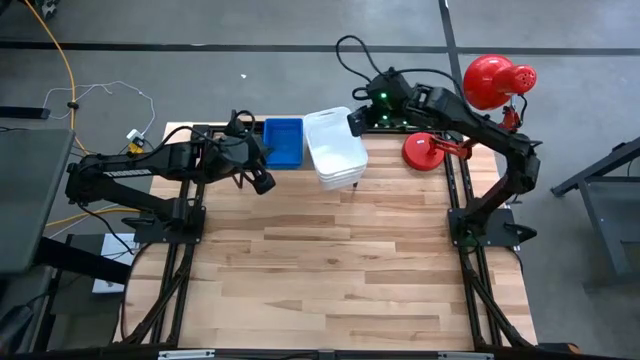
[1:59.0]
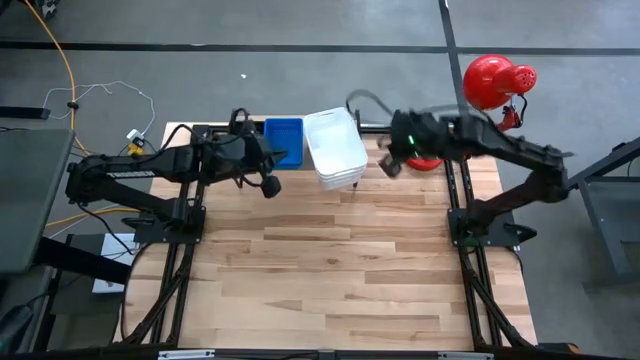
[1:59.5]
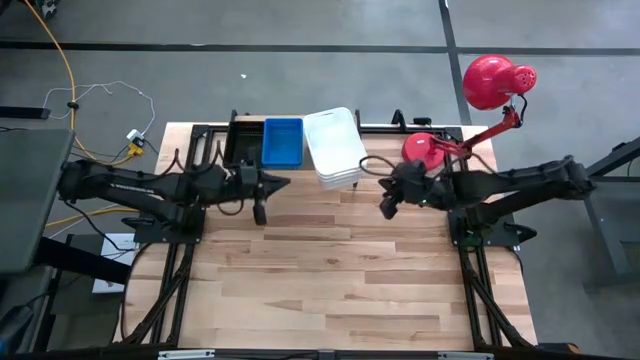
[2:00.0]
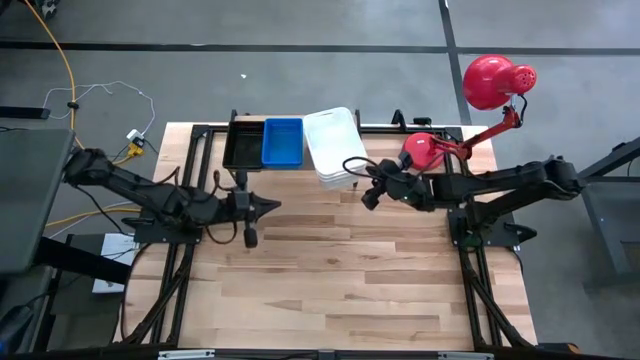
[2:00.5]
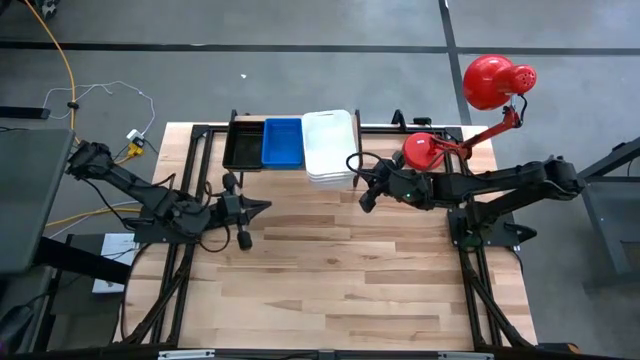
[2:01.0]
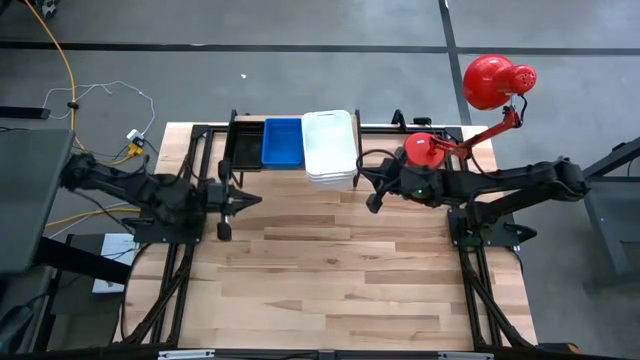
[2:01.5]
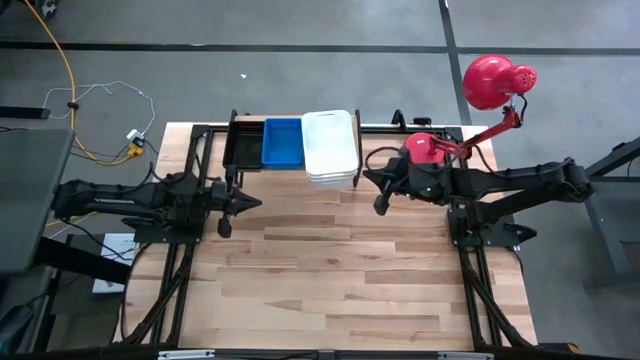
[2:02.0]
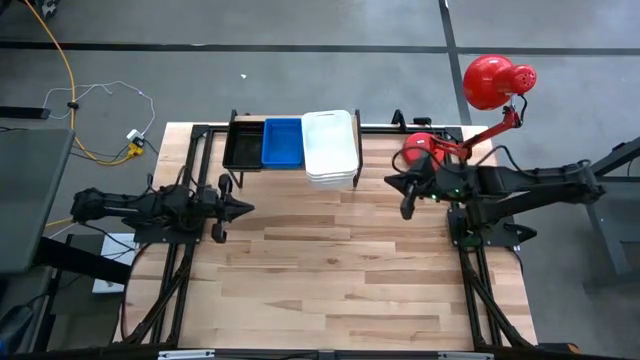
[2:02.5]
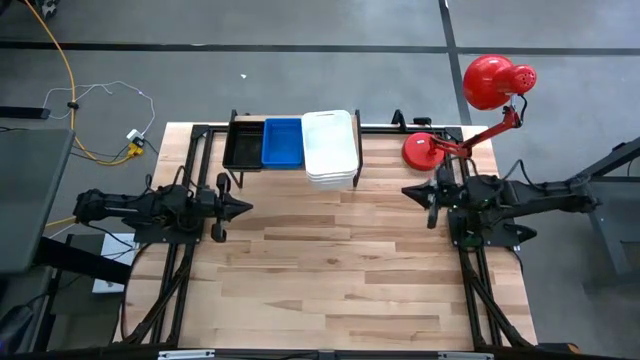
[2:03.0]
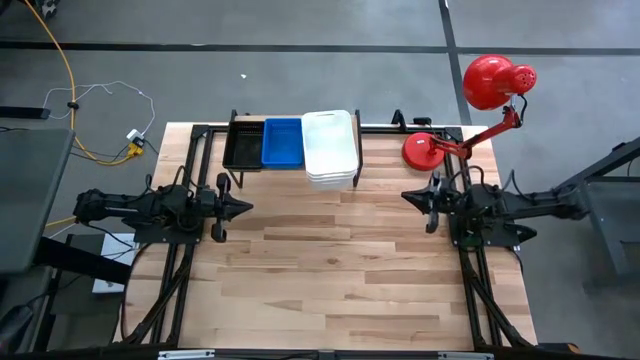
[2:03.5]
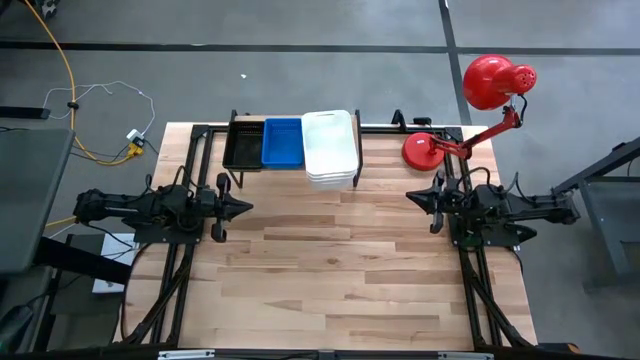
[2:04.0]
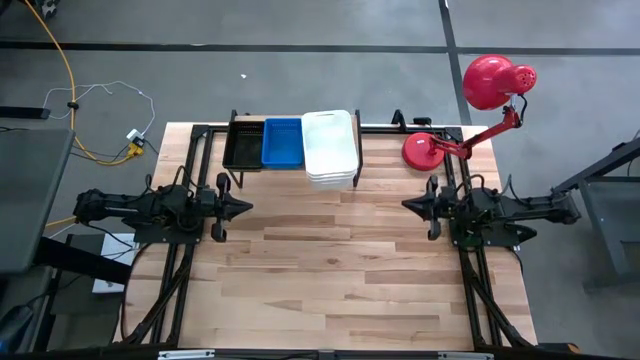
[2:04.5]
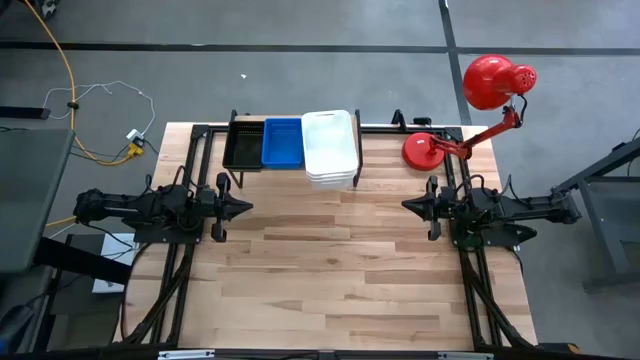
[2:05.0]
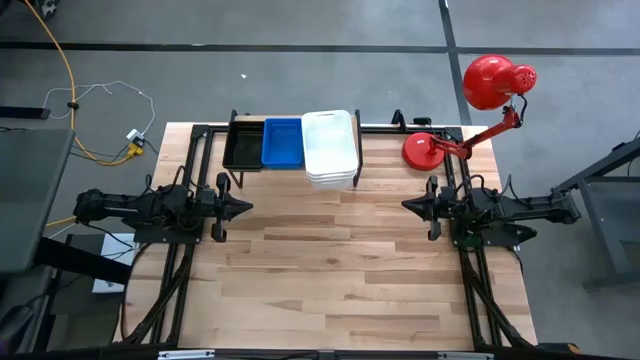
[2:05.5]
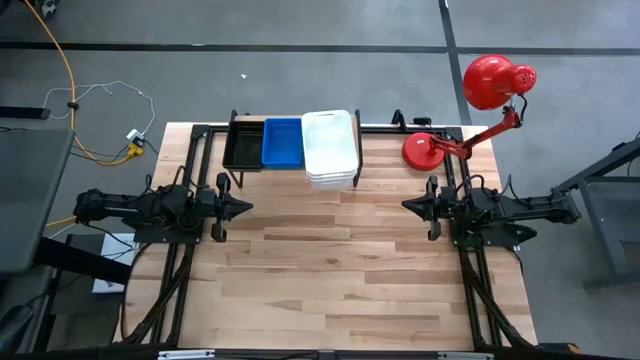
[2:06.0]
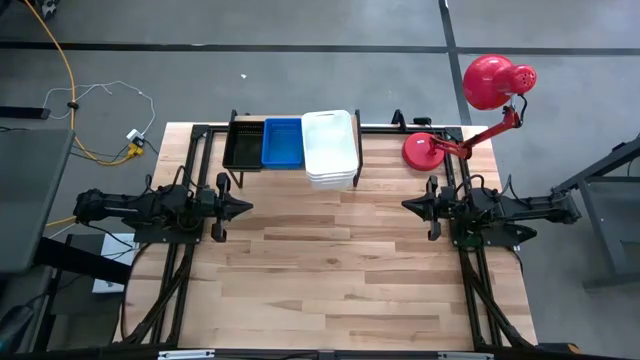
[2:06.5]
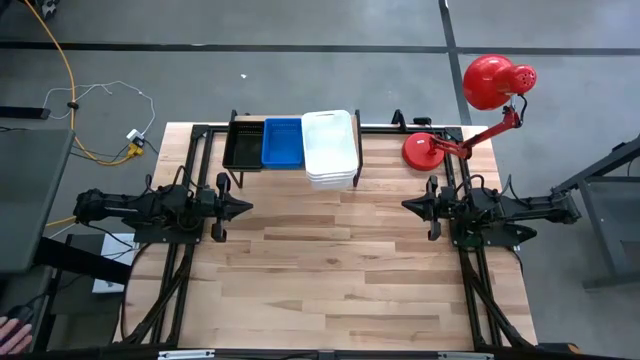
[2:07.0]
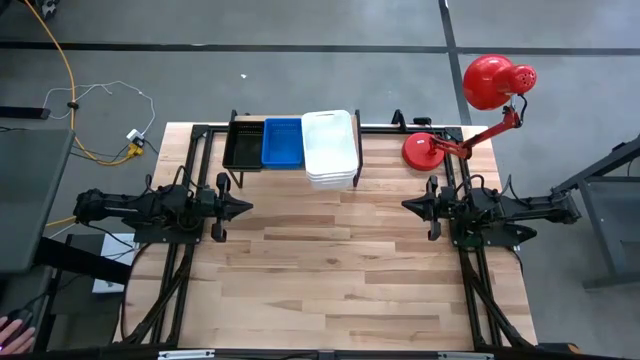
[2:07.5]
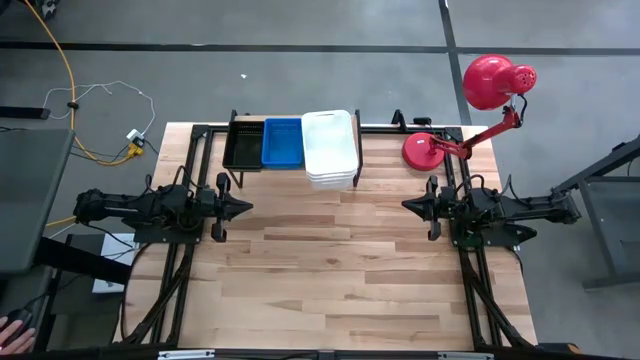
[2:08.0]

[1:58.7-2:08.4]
Task: Stack baskets on shelf by color
Return to Home Position

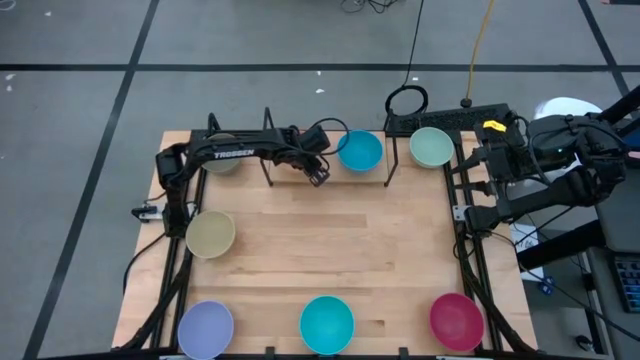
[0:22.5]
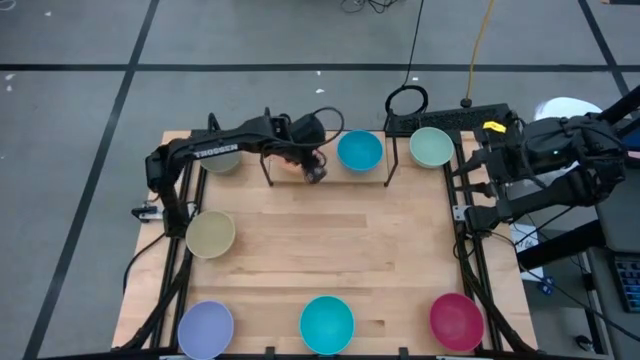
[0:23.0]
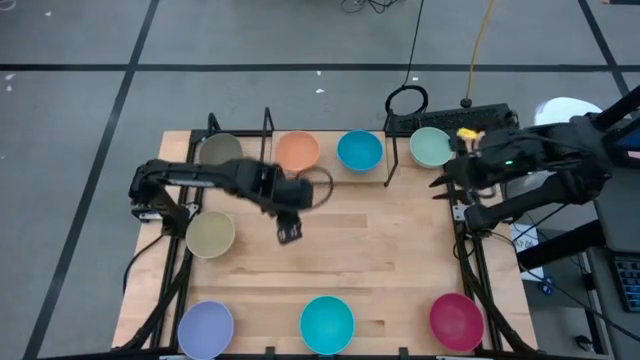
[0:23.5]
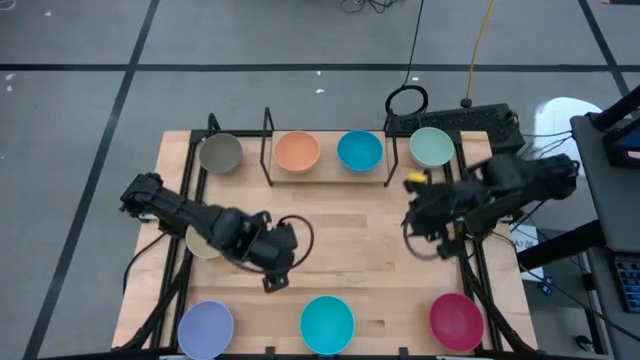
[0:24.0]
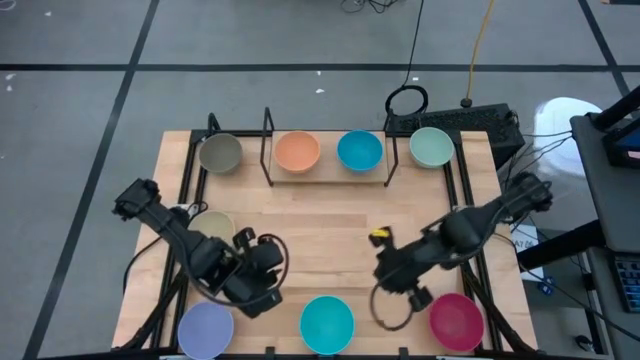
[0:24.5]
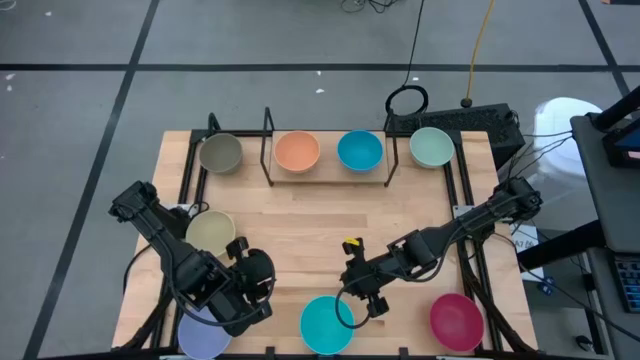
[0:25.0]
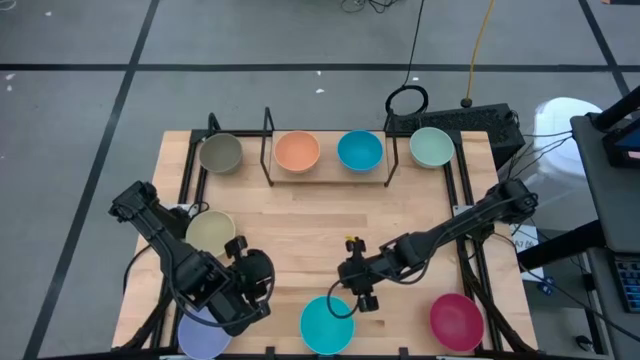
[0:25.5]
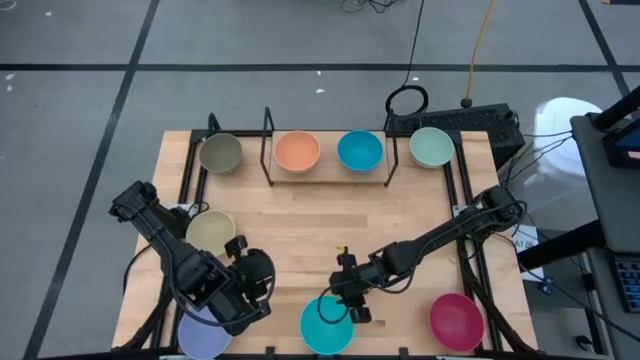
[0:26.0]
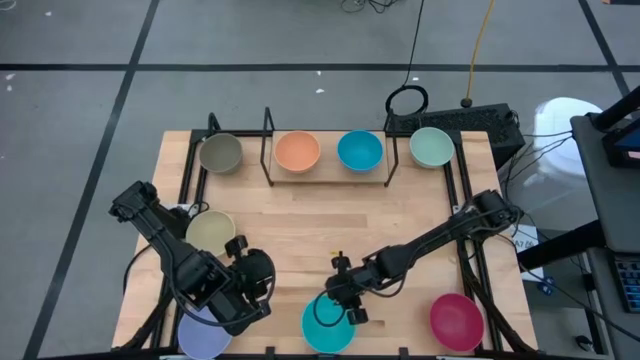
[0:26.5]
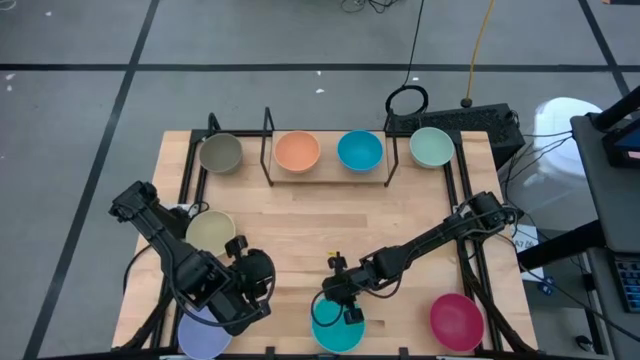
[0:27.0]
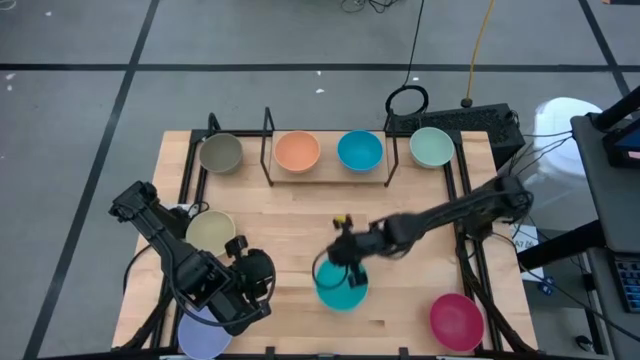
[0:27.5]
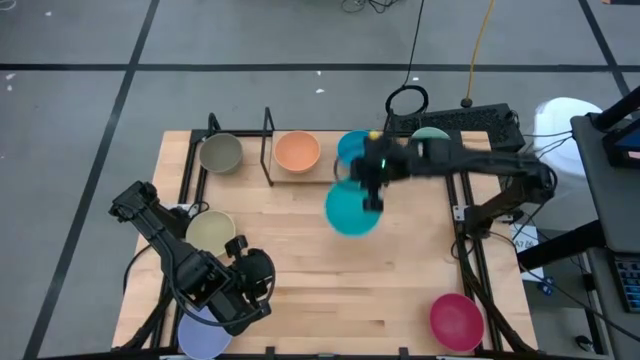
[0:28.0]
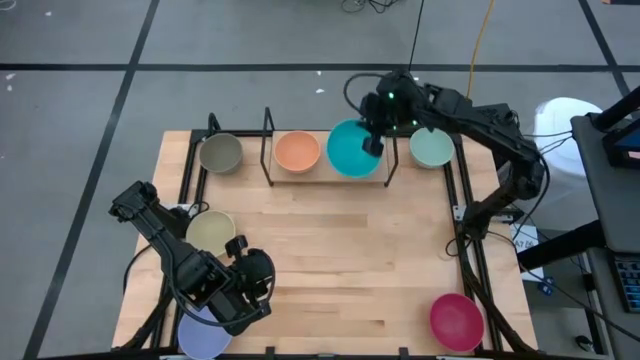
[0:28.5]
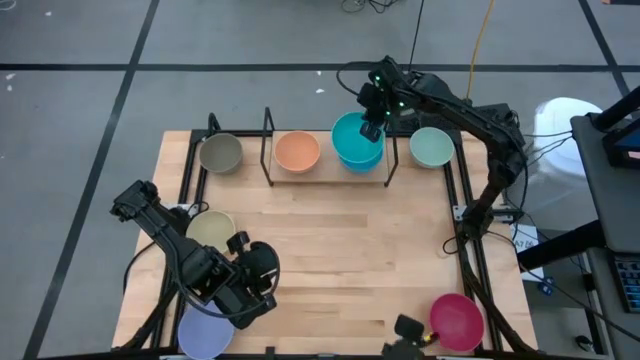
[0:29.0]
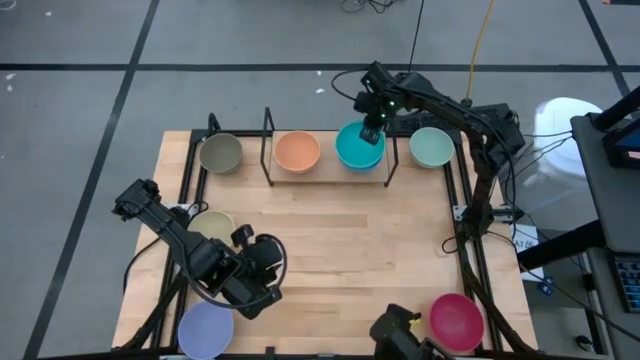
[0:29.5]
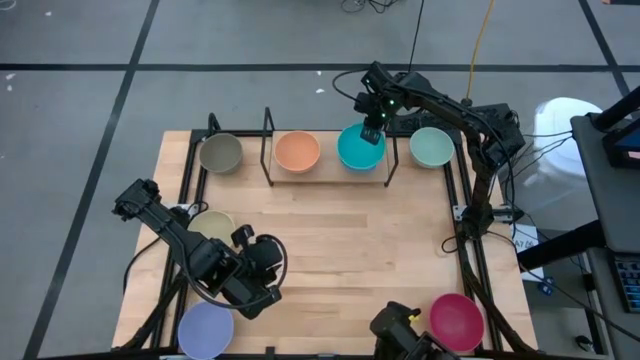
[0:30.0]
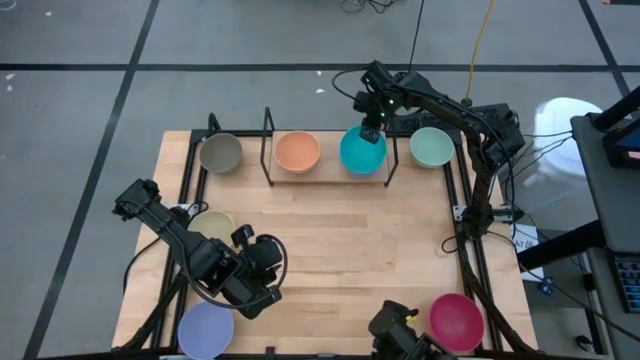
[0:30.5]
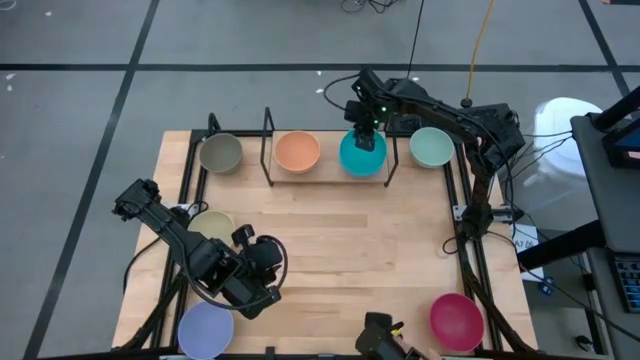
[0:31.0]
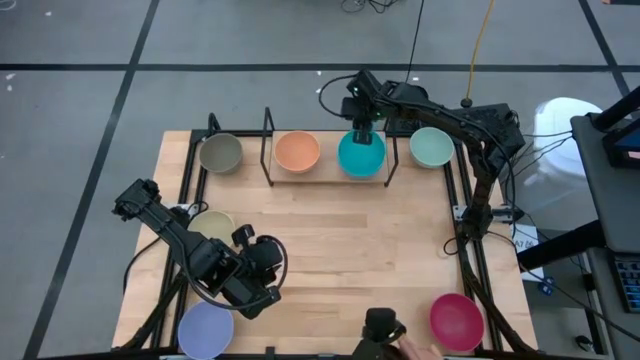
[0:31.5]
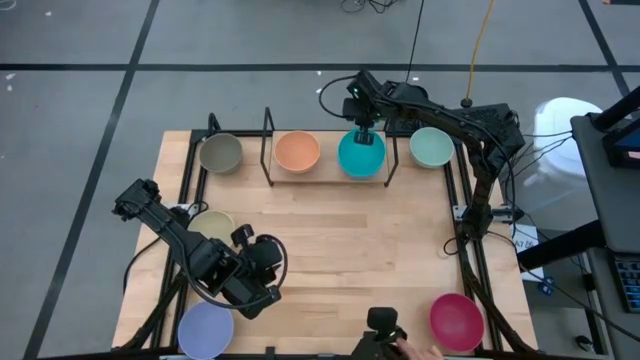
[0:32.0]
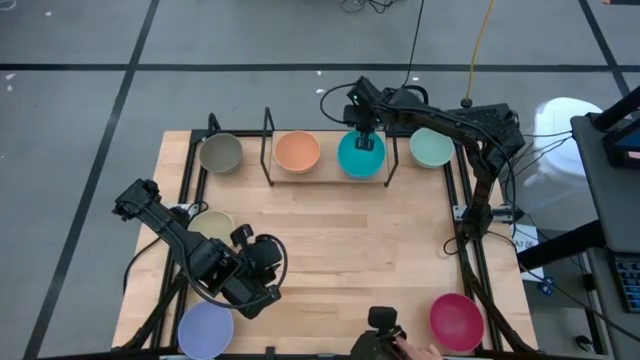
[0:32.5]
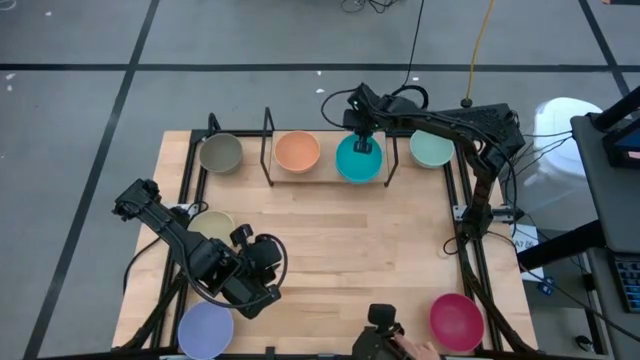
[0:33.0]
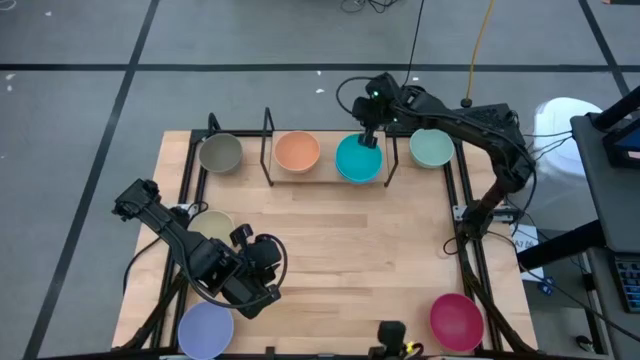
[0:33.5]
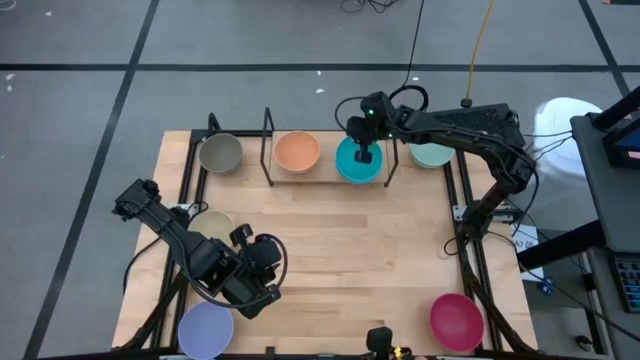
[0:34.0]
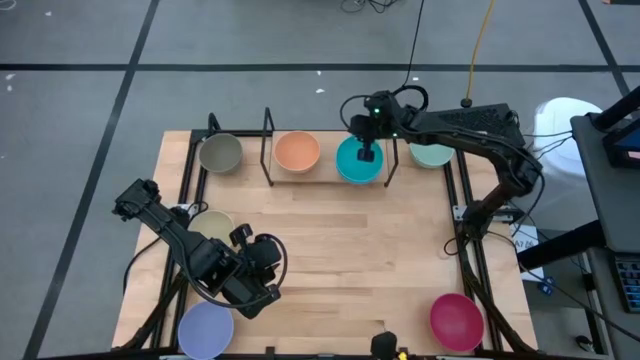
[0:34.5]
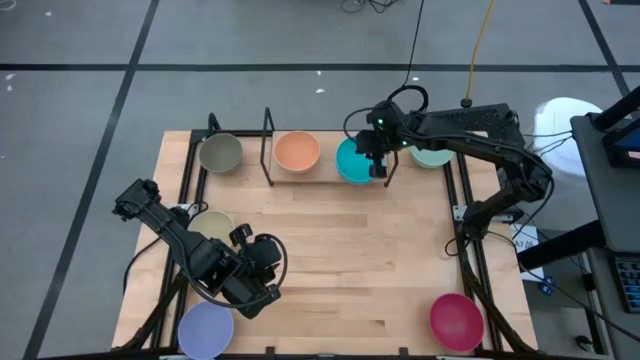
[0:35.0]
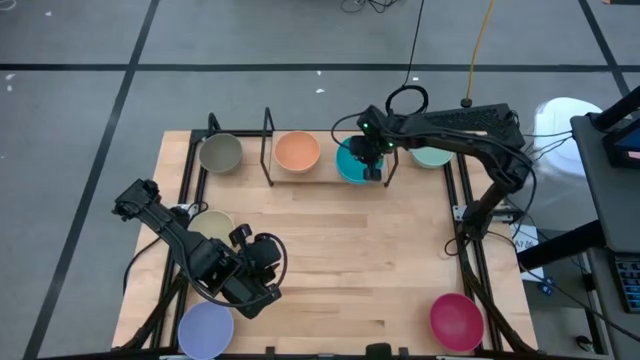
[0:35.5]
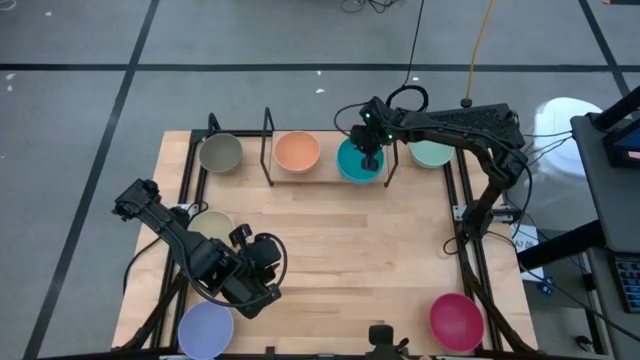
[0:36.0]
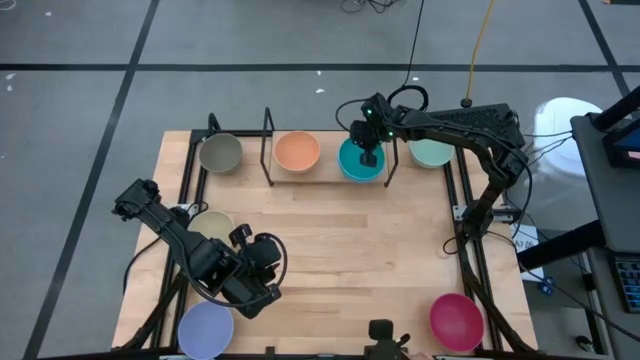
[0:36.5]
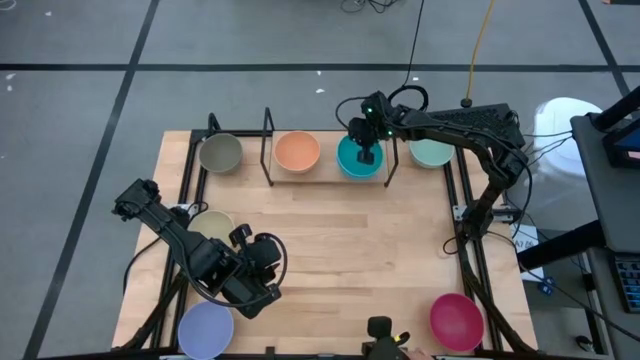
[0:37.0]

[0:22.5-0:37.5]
Task: Place and stack bowls onto a shelf
Stack the light blue bowl on top of the blue bowl on the shelf
